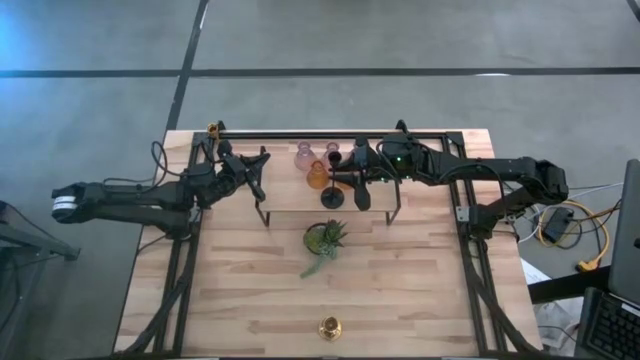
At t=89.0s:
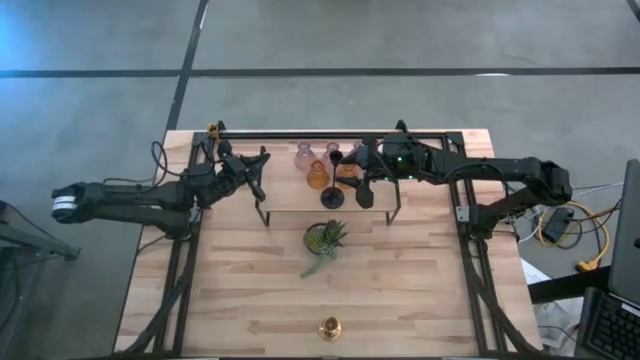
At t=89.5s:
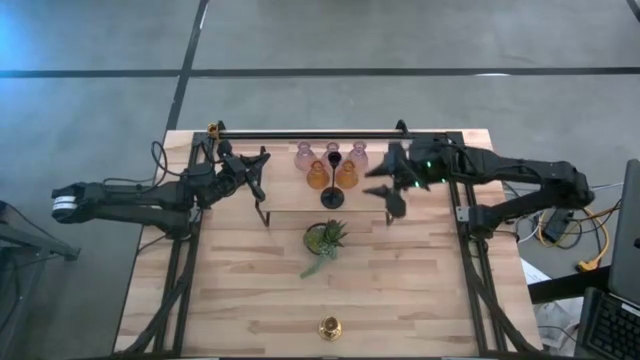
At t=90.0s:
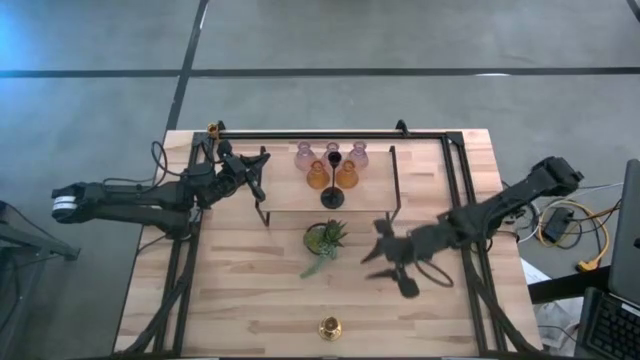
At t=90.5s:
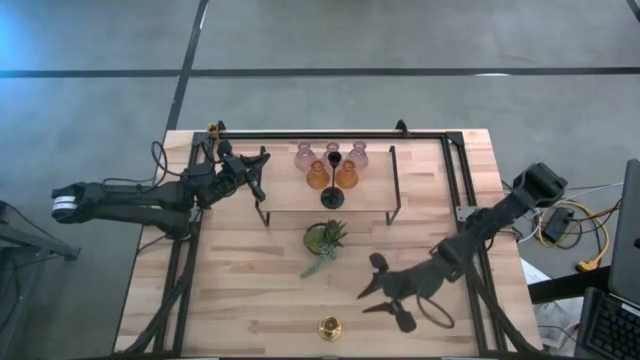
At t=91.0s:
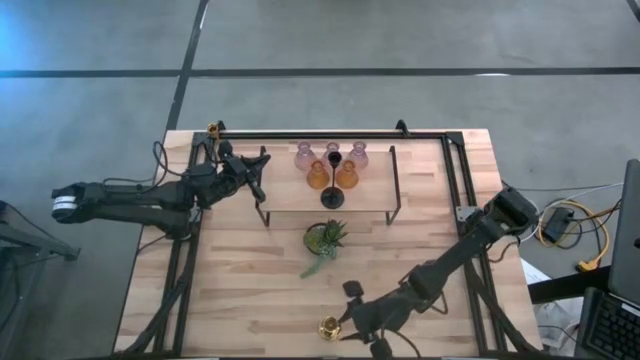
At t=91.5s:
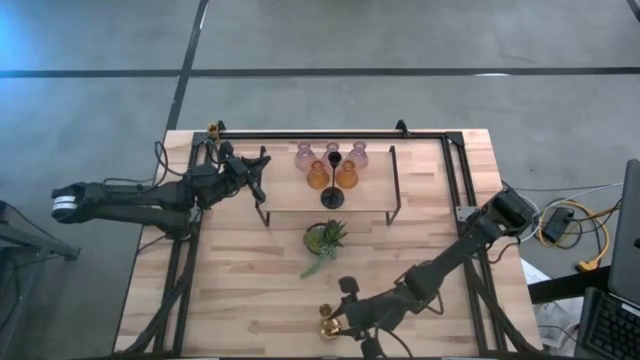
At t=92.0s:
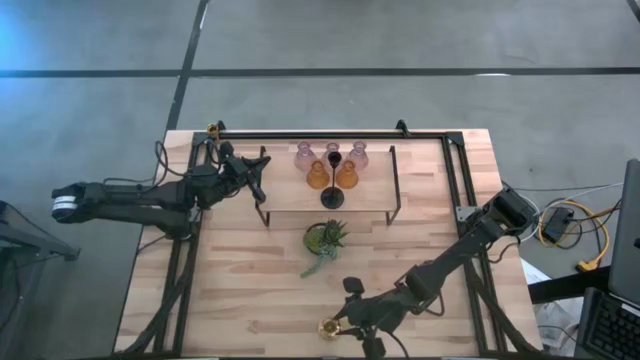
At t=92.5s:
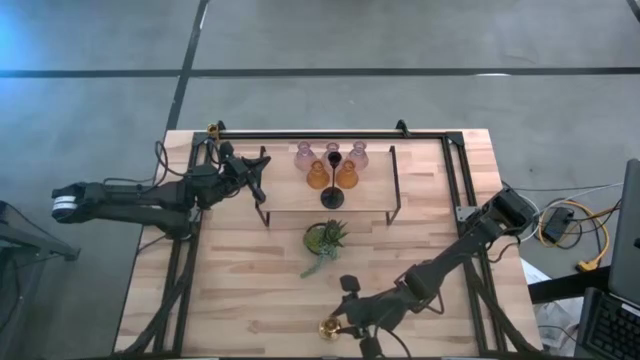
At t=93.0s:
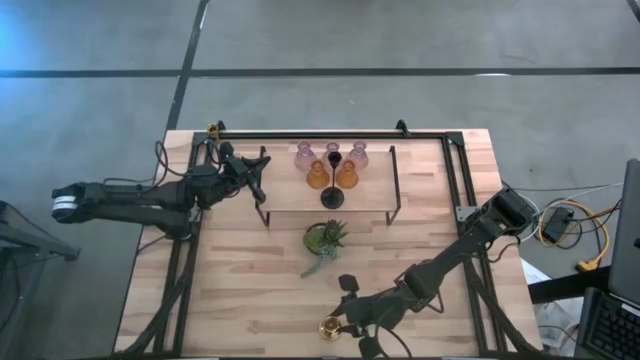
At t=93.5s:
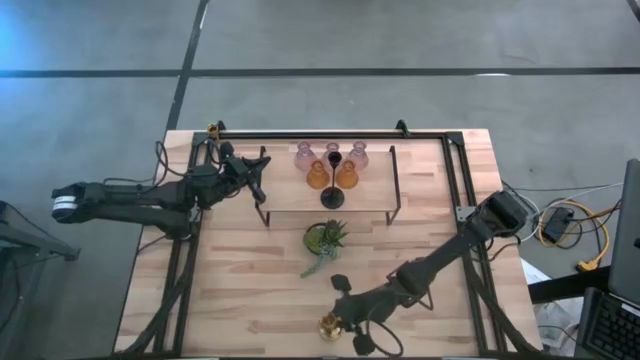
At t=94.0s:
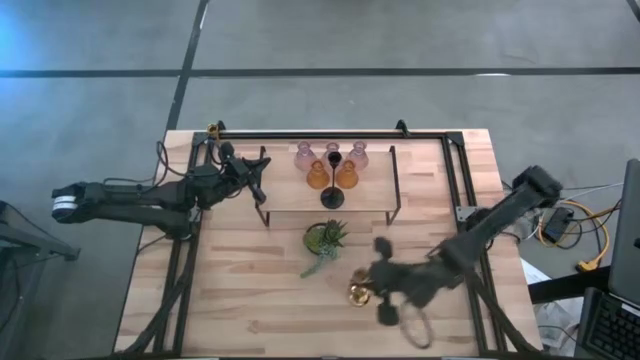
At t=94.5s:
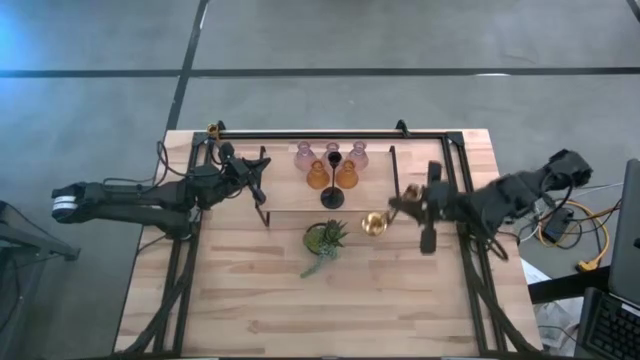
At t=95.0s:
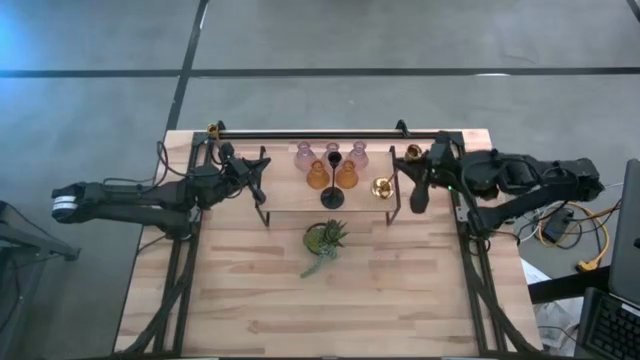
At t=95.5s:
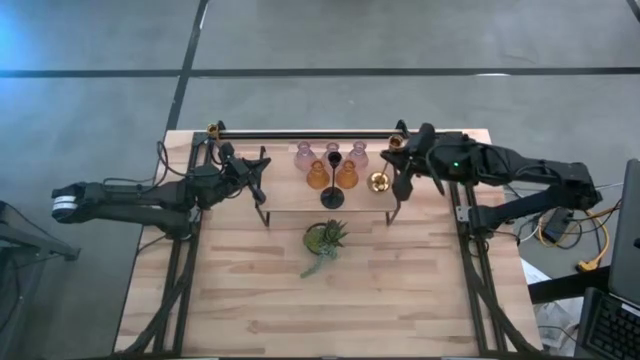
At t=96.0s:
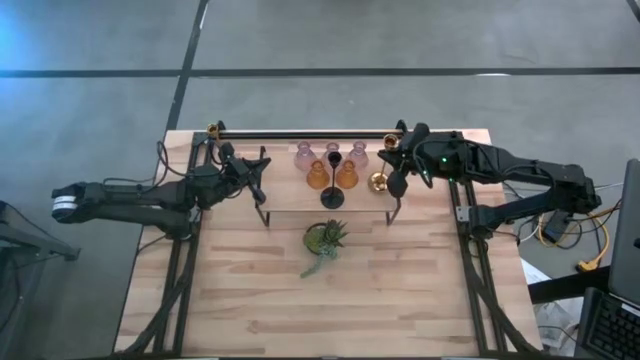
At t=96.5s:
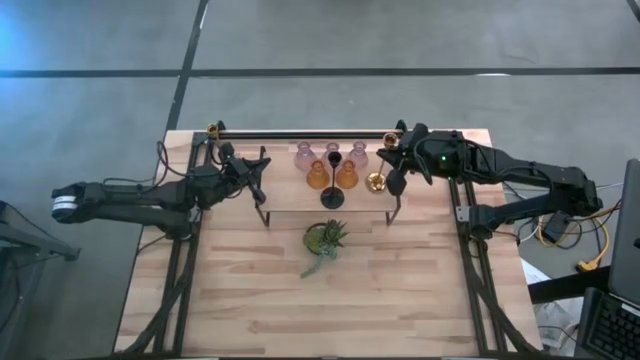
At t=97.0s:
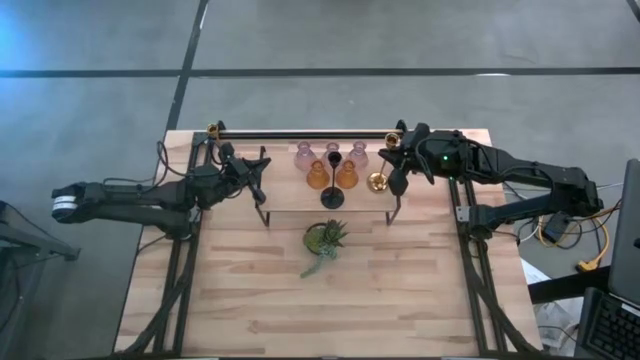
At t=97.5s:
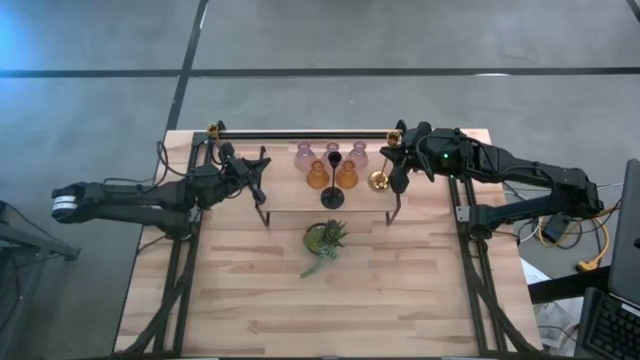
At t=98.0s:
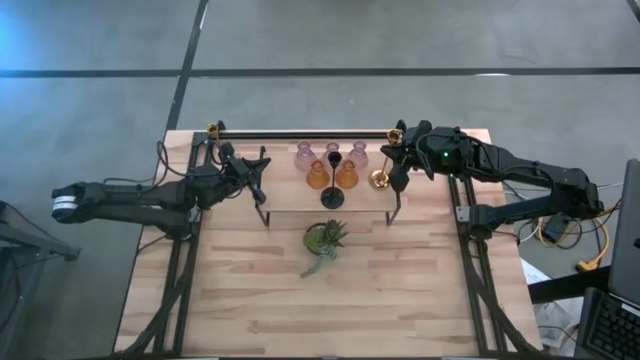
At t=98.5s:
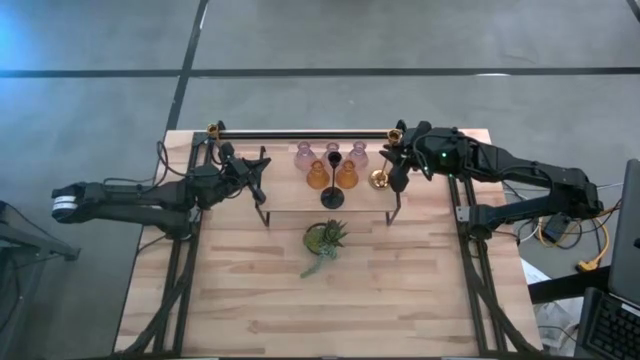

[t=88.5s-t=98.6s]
Task: Pick & Place candle stick holders
Put the bottom gold candle holder on the shelf

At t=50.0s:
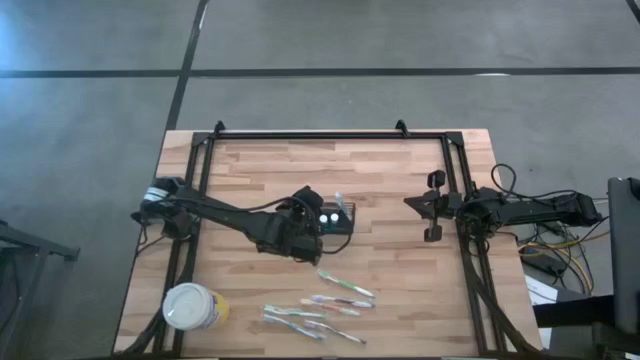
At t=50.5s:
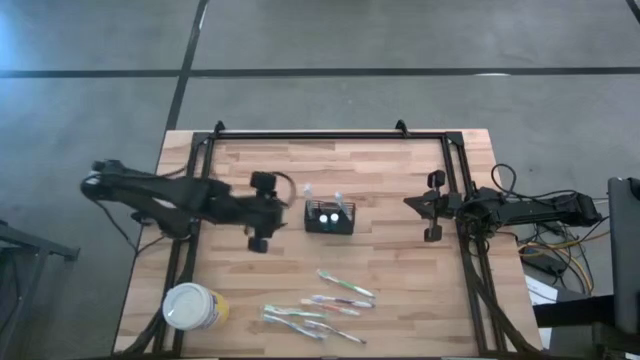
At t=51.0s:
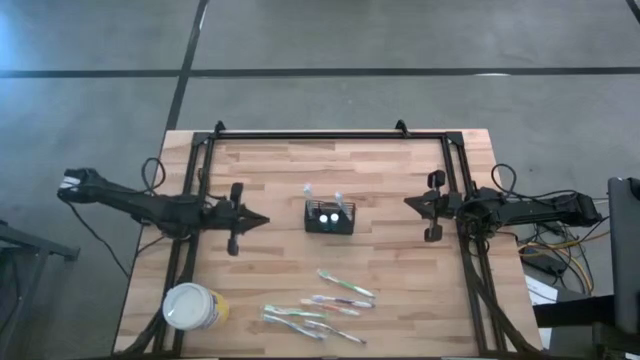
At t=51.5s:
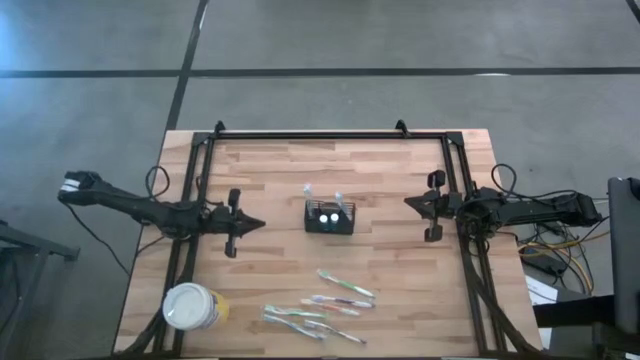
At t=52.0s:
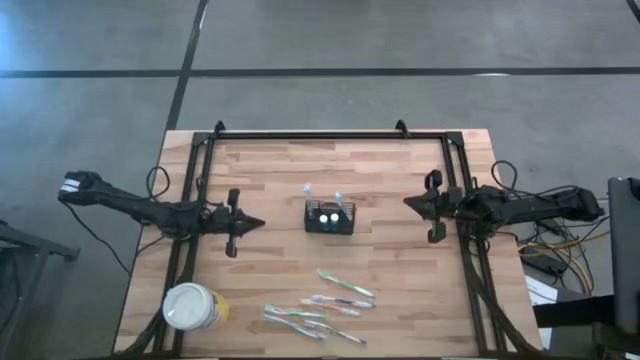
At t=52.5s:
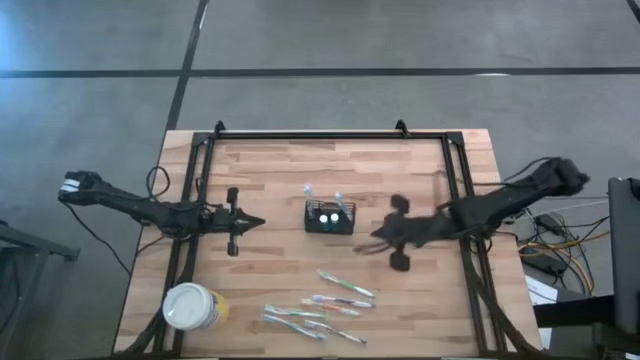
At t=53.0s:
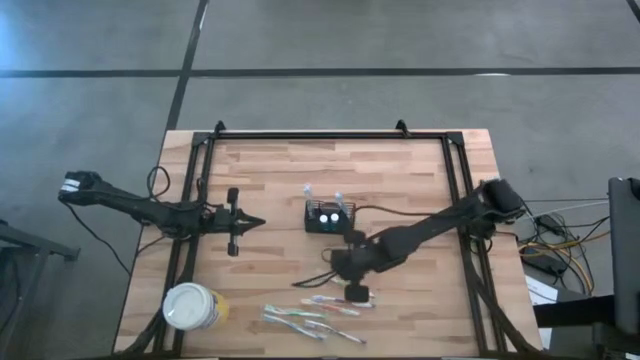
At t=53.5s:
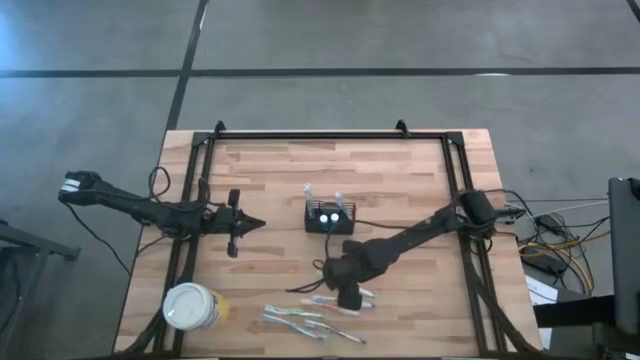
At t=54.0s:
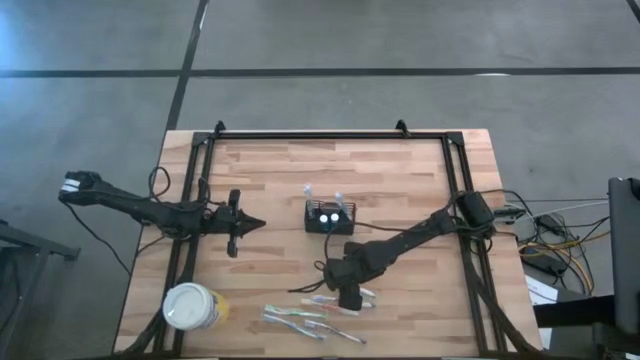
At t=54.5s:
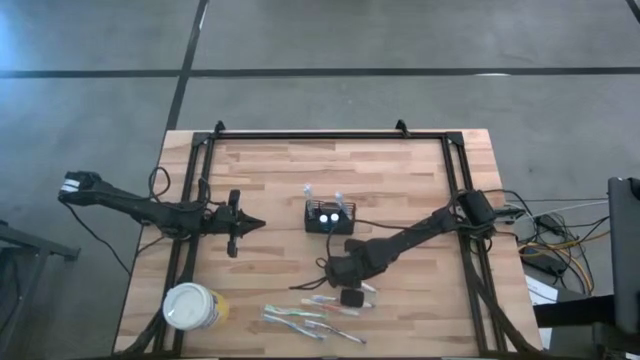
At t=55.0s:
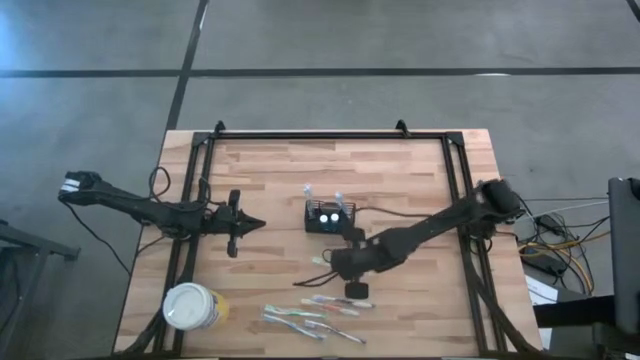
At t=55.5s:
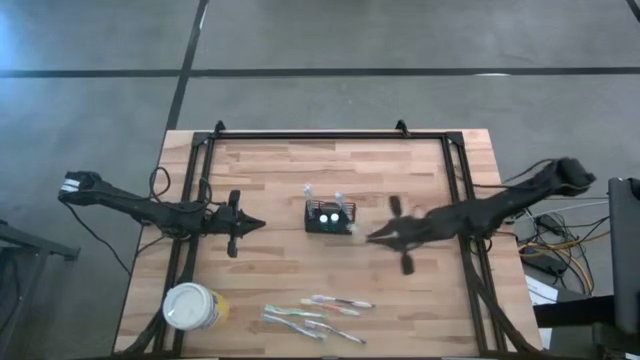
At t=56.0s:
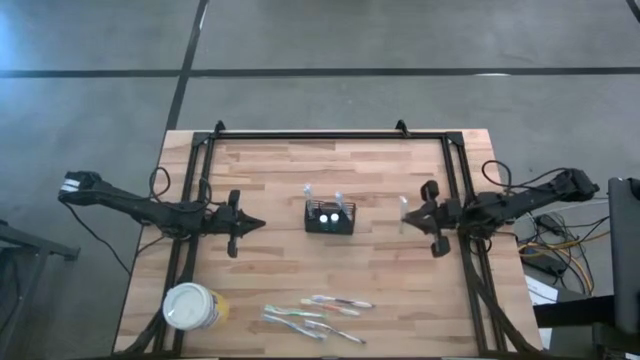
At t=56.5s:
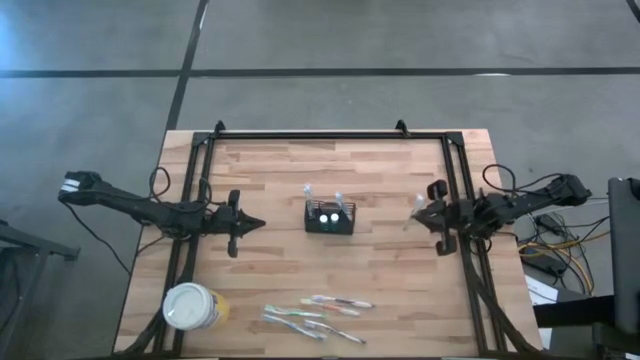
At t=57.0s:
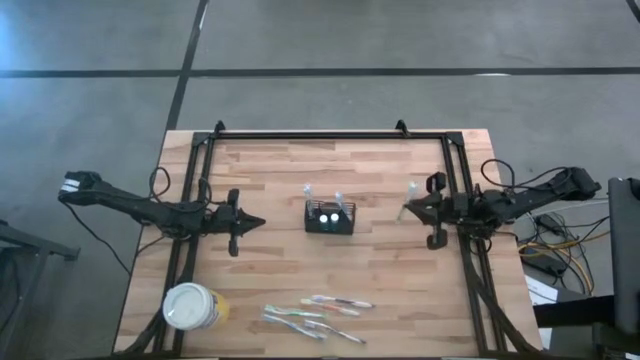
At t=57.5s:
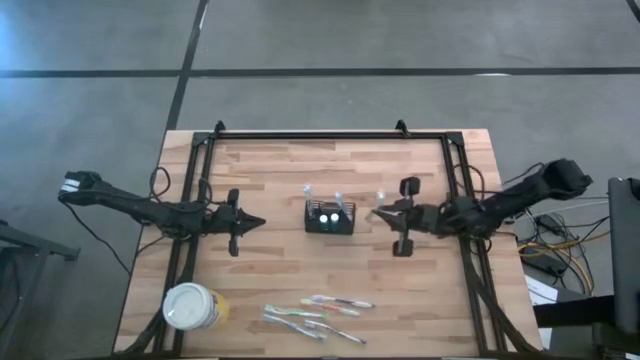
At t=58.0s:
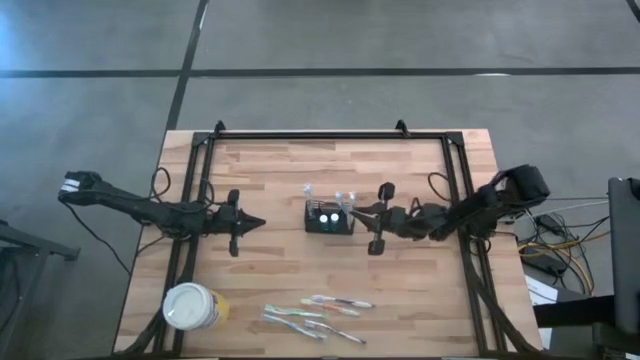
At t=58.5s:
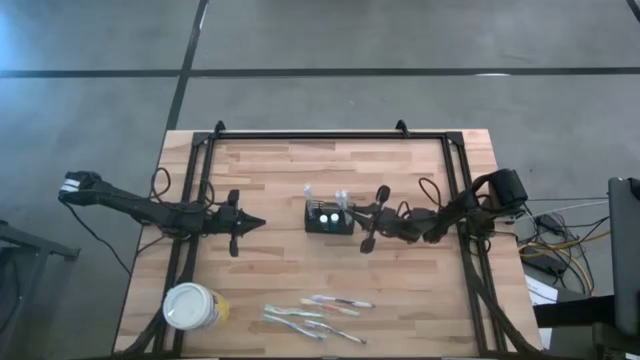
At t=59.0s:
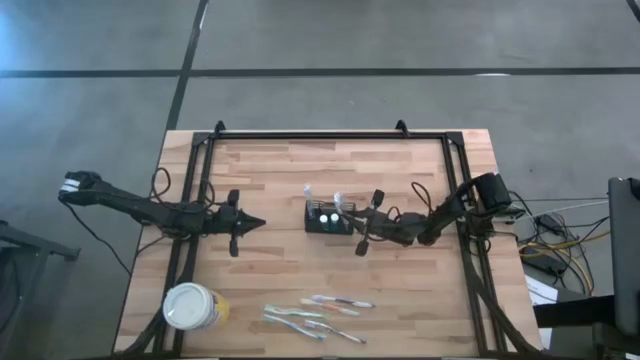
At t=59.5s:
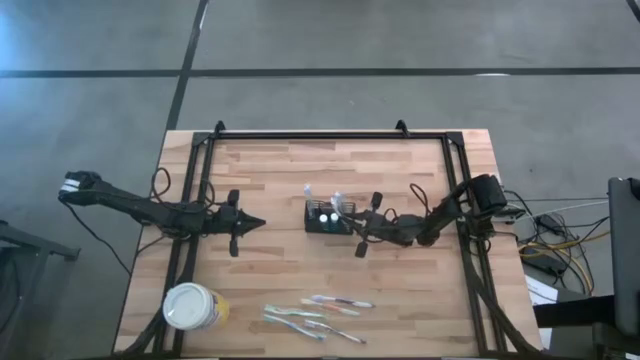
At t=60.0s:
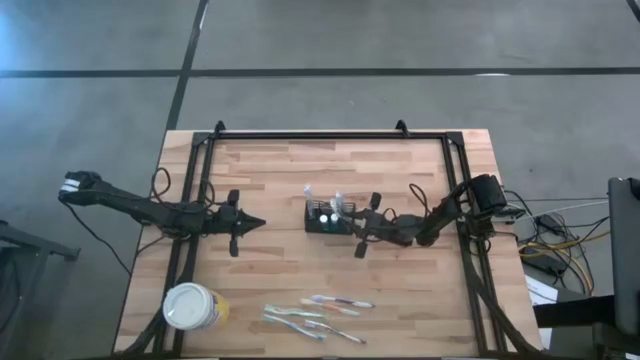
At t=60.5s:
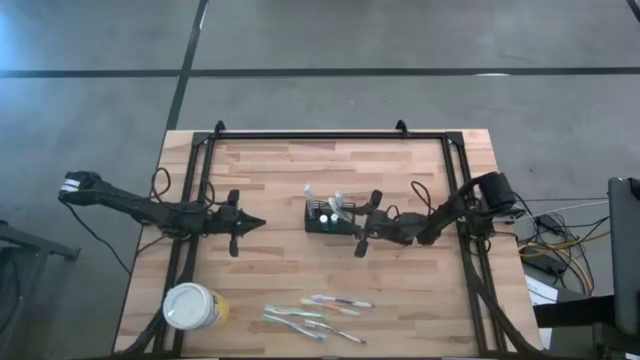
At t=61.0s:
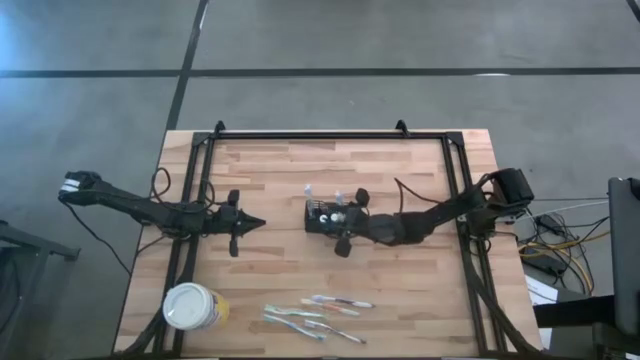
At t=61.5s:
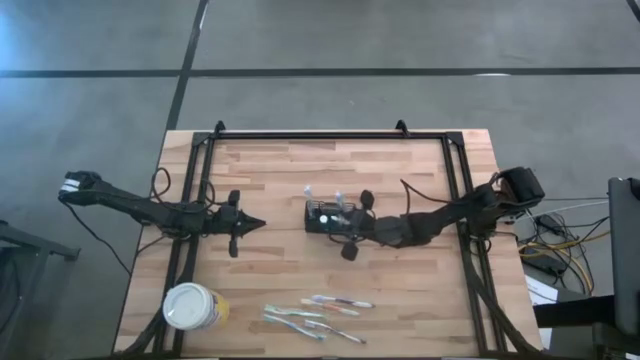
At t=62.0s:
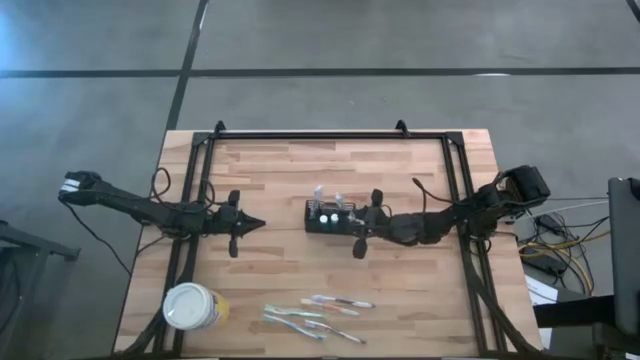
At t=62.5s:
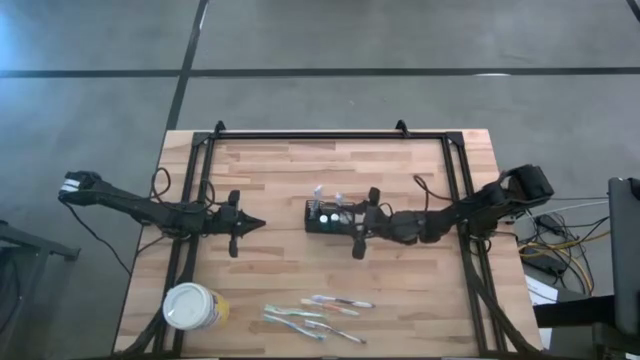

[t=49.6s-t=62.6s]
Task: Pick & Place toothbrushing station
Put the top green toothbrush into the wire organizer
